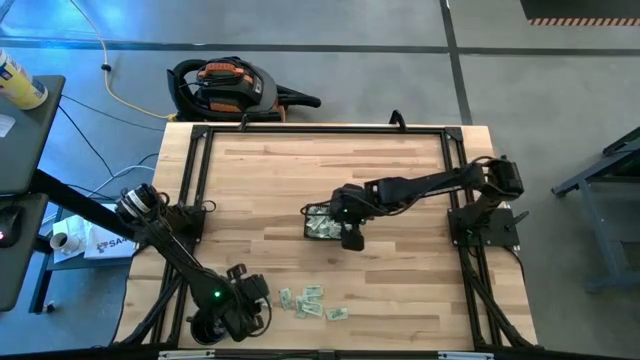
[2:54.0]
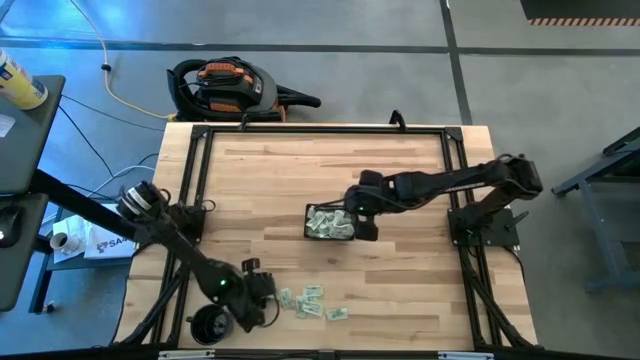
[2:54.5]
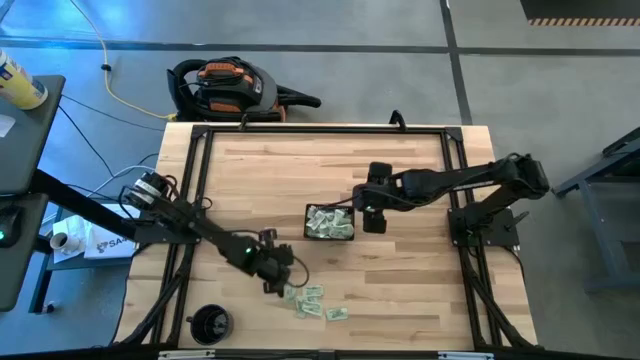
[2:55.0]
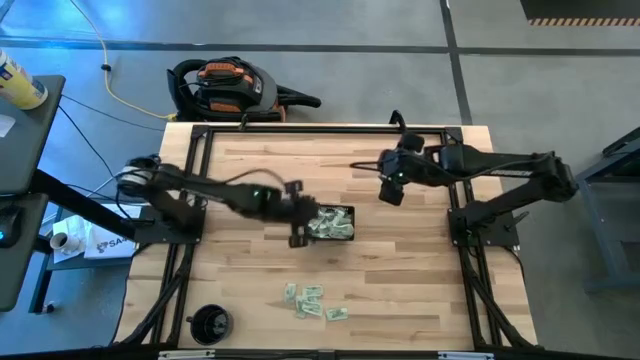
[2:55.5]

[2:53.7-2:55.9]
Task: Pick and place Stevia / Truvia into bins
Put the green stevia packet into the black basket

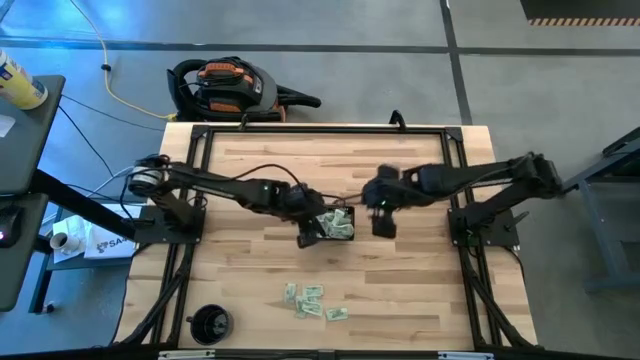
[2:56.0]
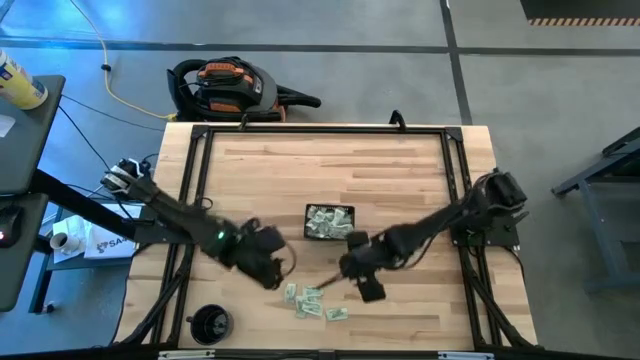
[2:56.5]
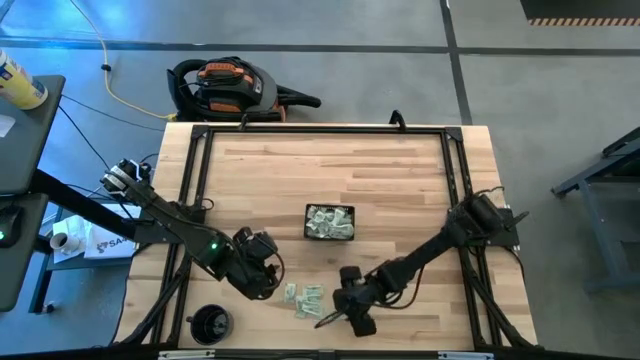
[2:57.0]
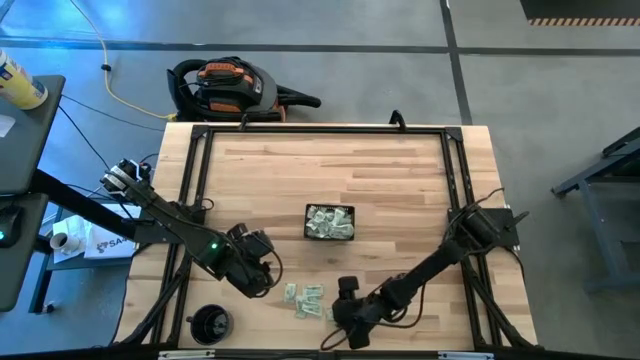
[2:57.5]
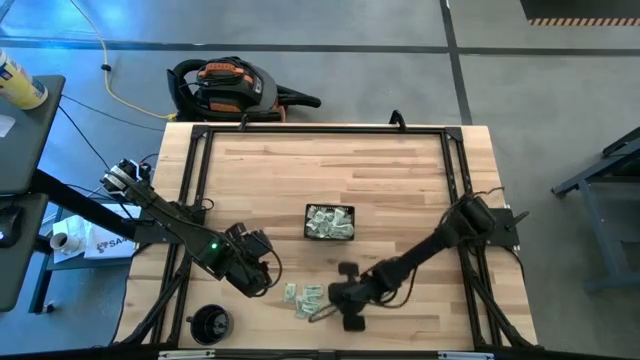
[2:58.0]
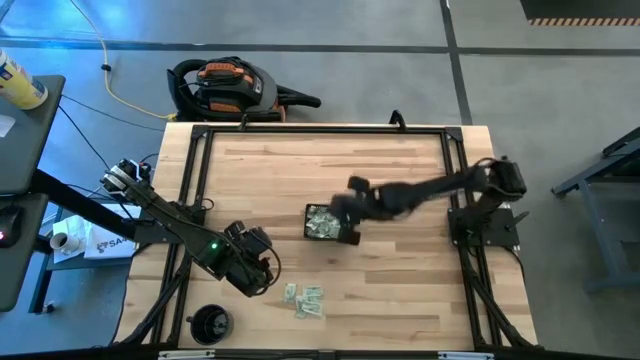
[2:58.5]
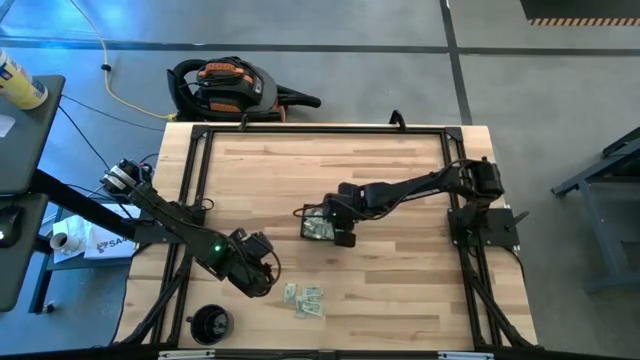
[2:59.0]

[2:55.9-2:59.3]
Put the green stevia packet into the black basket

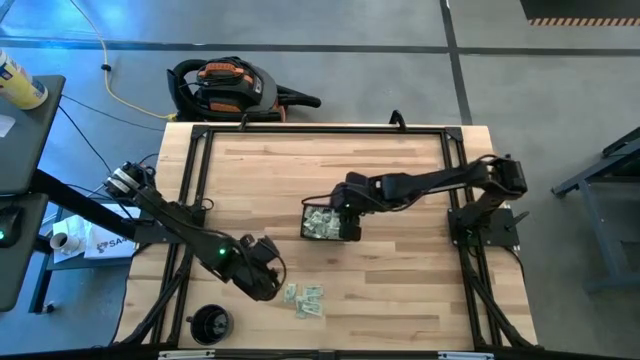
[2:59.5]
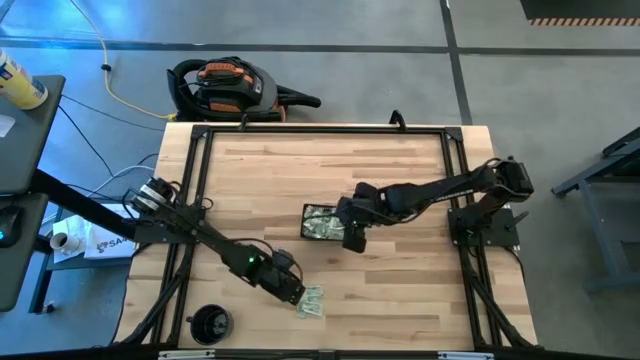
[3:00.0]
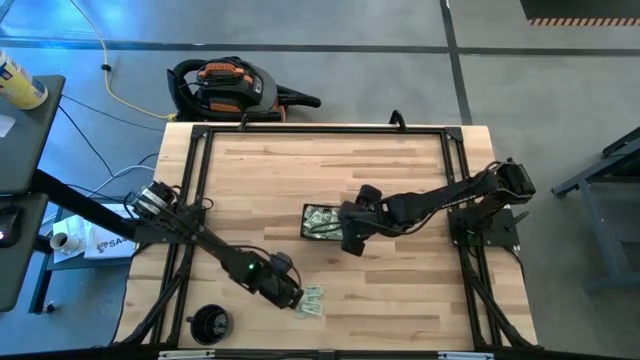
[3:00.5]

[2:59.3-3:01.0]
Put the green stevia packet into the black basket

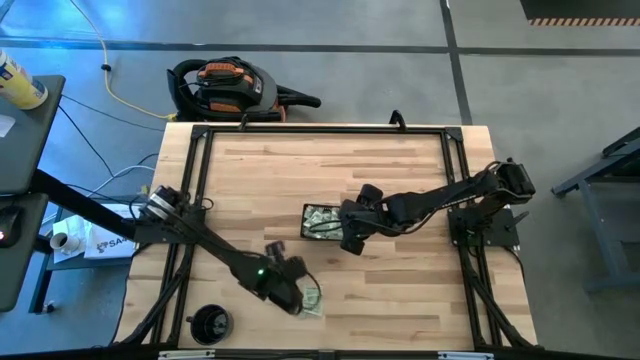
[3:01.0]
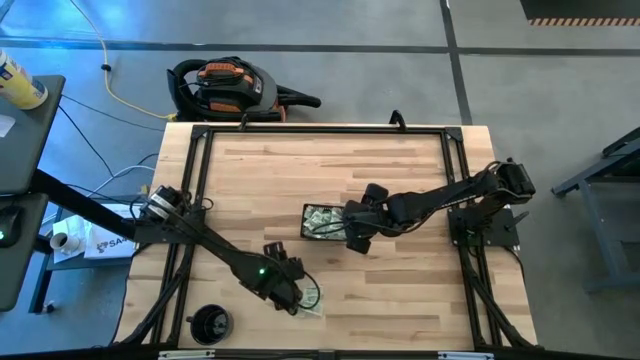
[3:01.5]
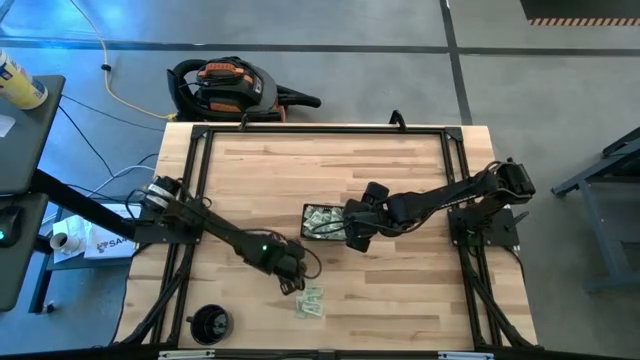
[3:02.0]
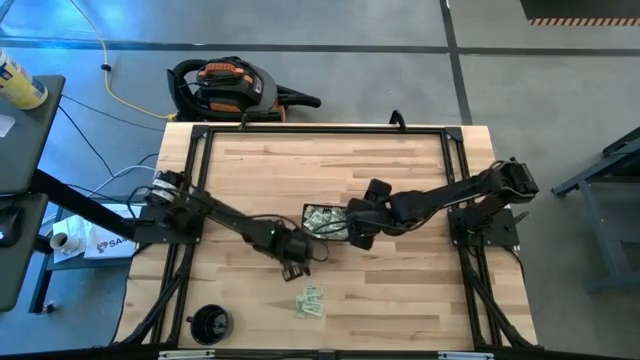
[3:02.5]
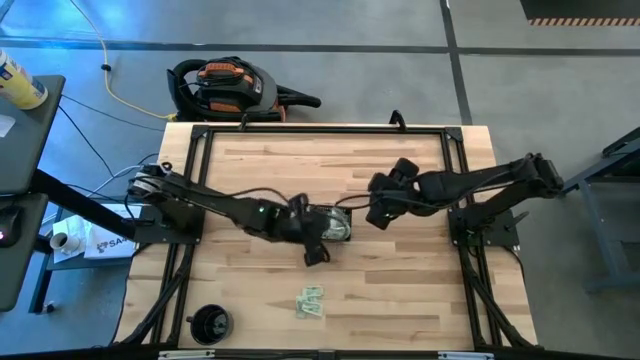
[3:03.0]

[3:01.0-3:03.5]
Put the green stevia packet into the black basket

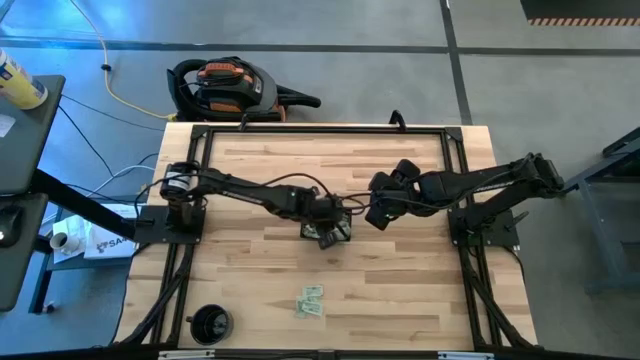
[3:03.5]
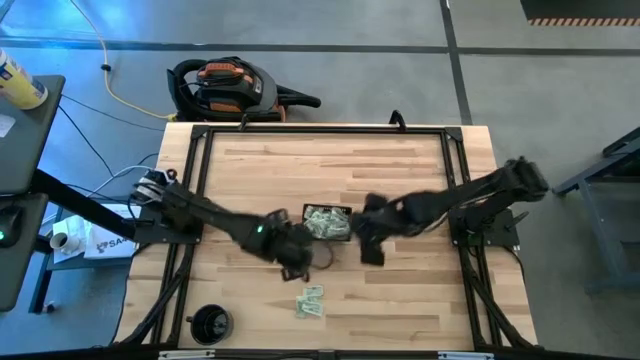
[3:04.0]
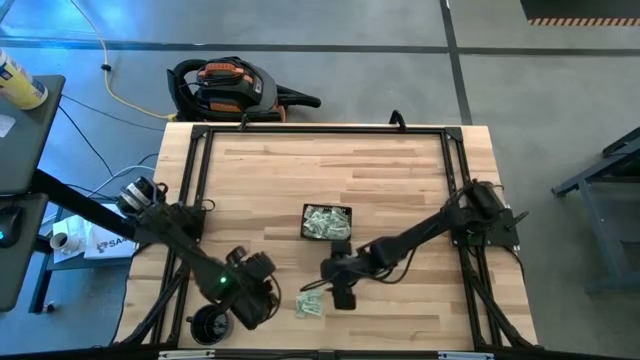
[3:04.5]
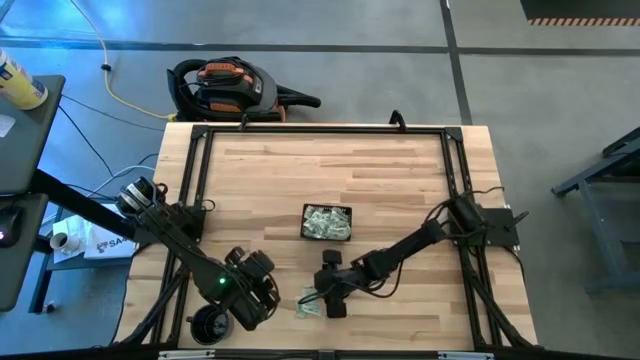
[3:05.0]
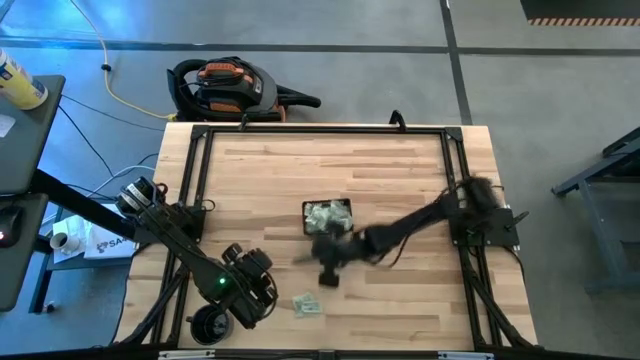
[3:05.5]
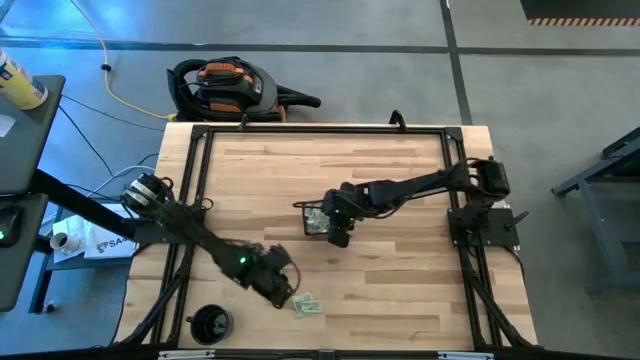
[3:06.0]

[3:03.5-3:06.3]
Put the green stevia packet into the black basket

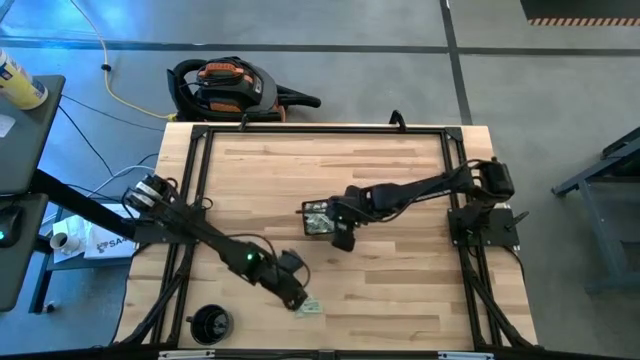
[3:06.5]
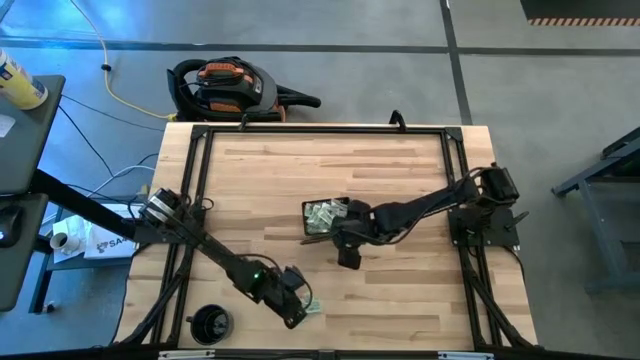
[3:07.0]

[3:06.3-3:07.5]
Put the green stevia packet into the black basket

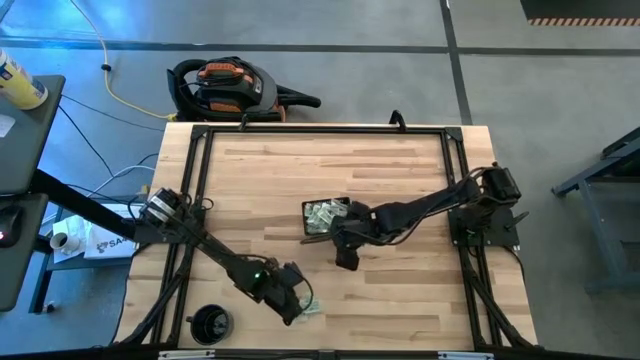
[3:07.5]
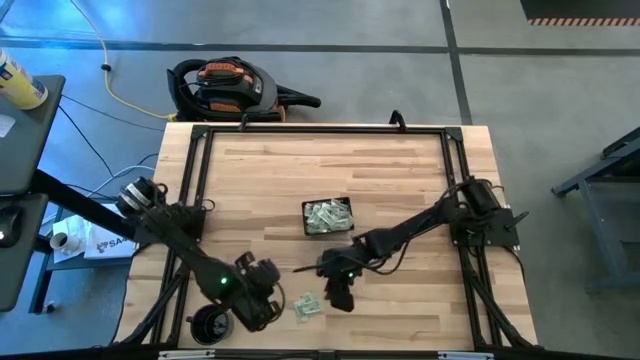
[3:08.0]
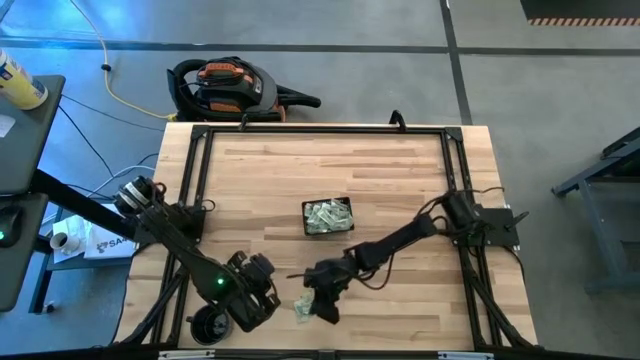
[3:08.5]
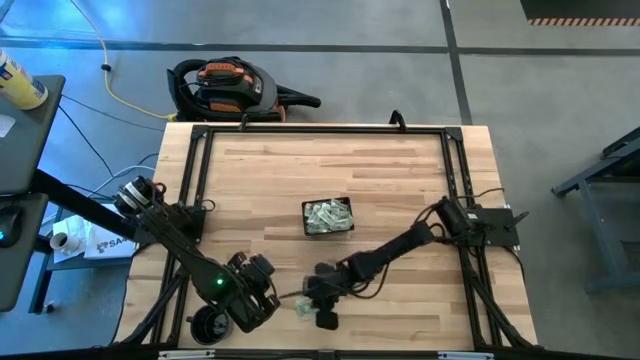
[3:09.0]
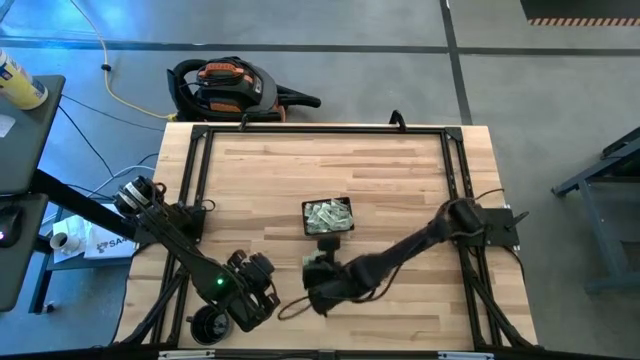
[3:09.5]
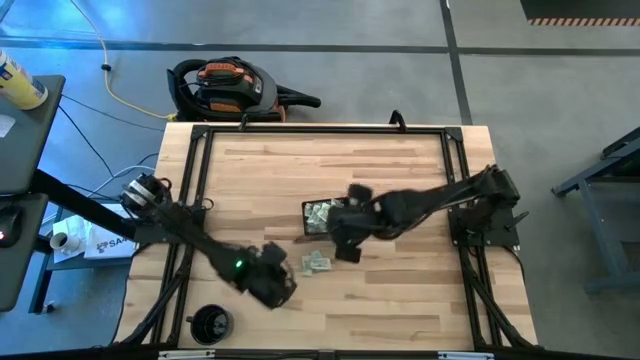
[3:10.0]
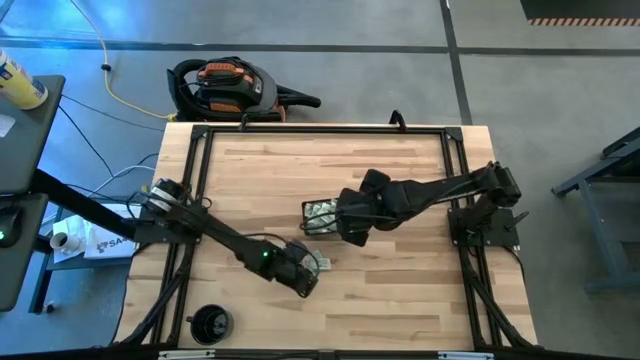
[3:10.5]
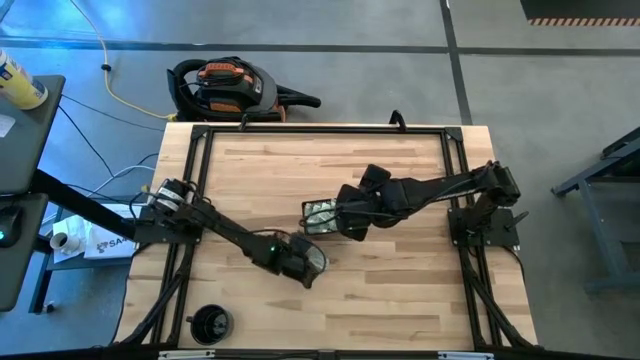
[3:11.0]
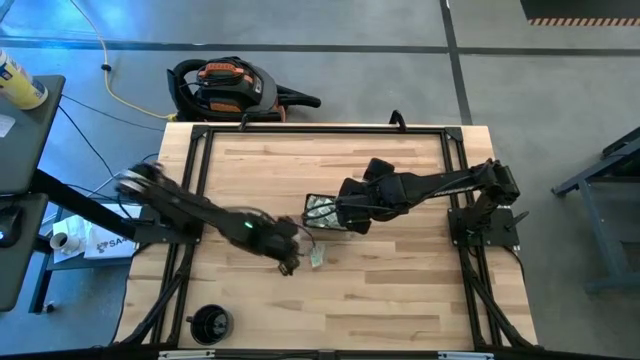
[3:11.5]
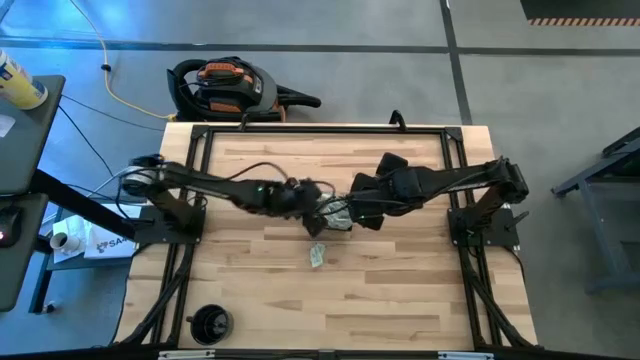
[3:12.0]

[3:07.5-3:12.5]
Put the green stevia packet into the black basket
